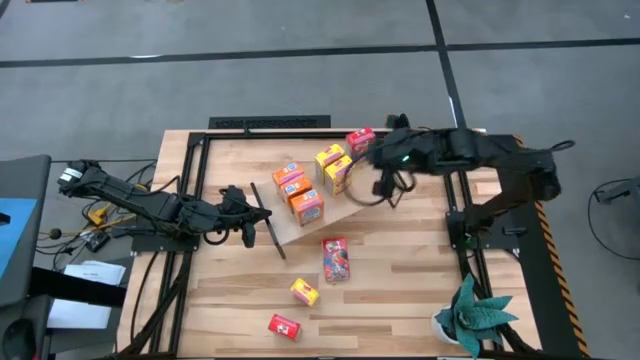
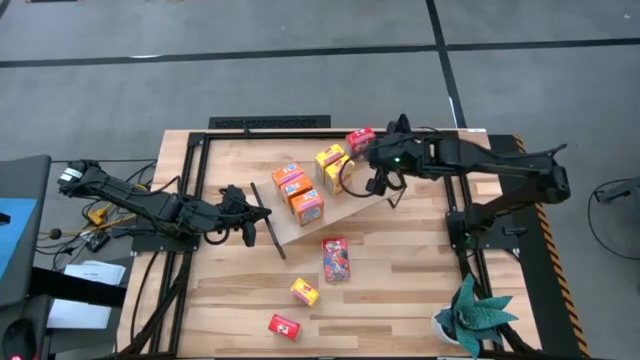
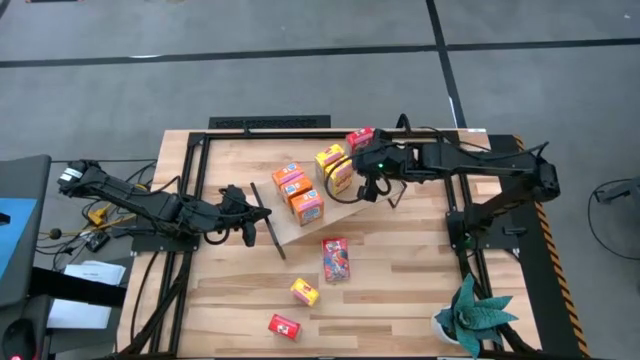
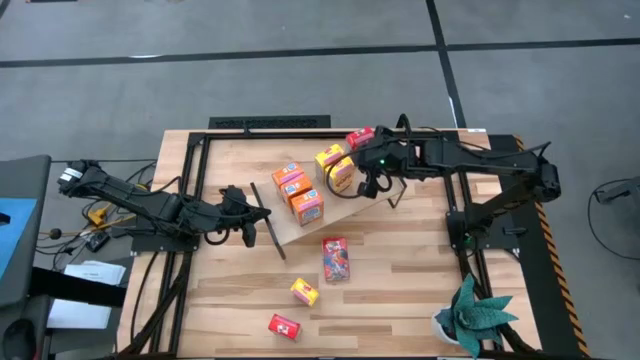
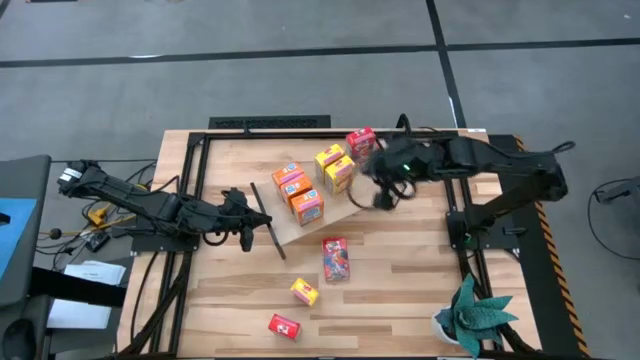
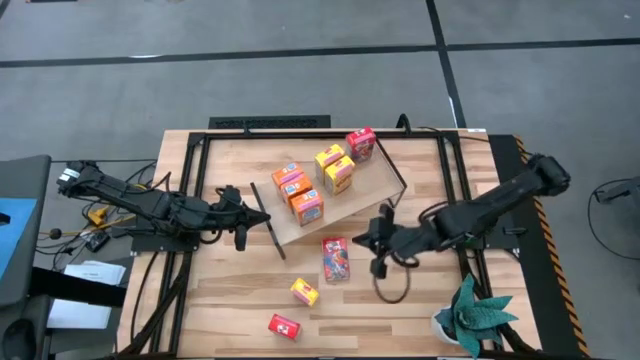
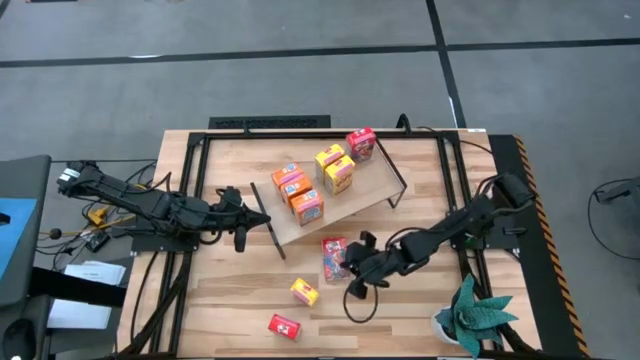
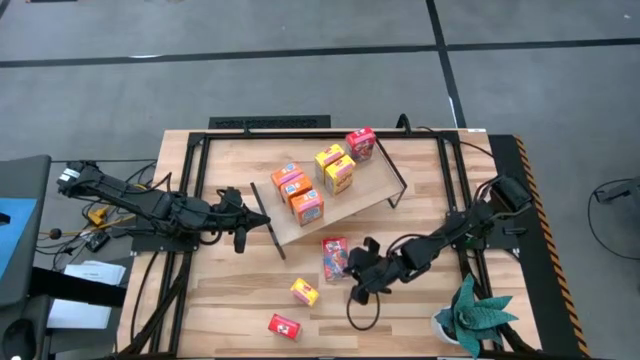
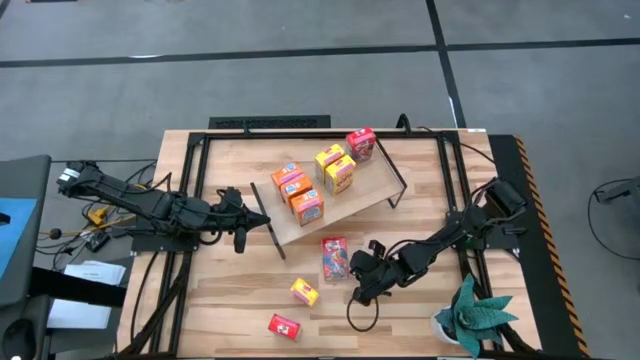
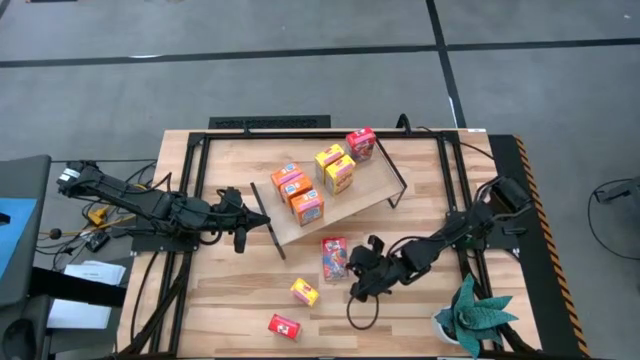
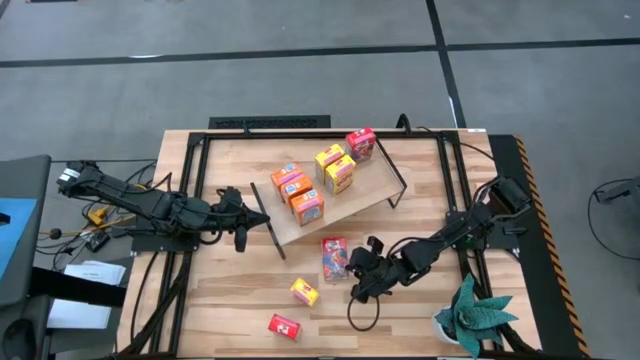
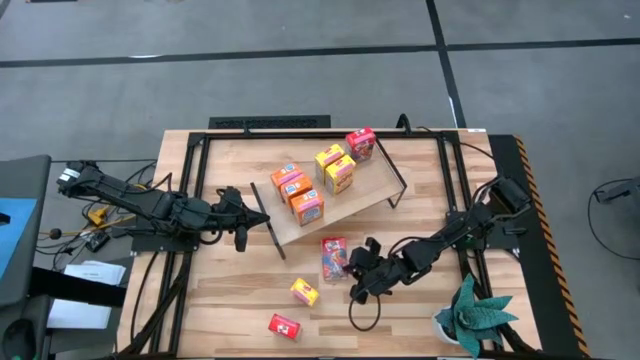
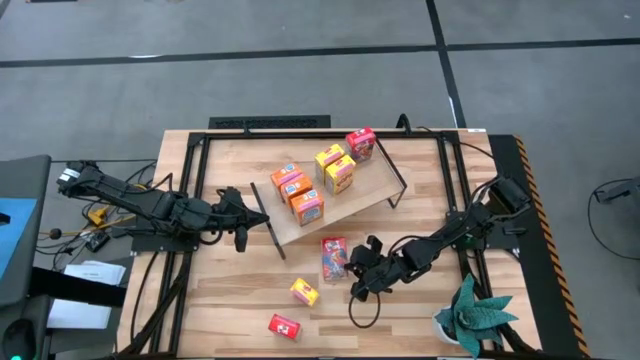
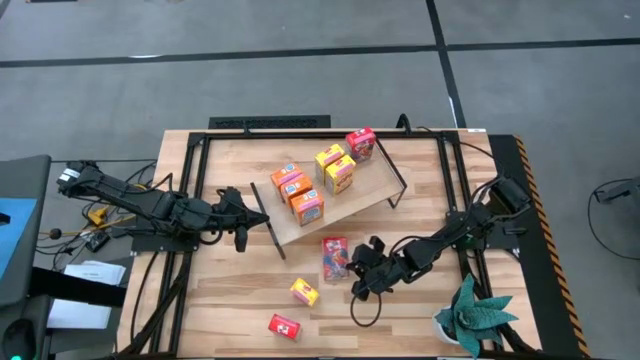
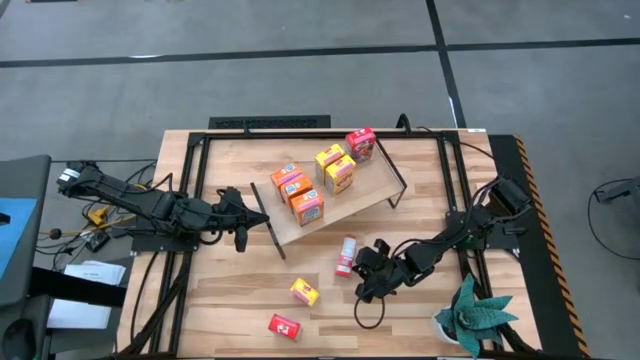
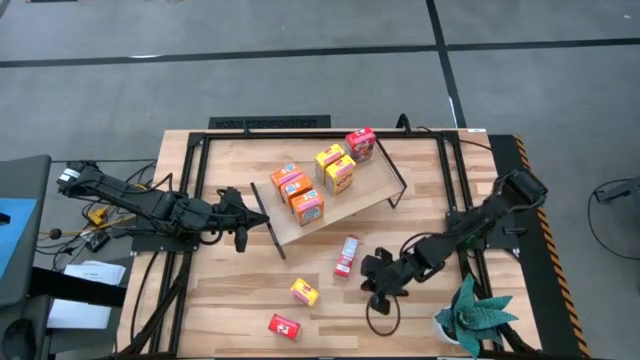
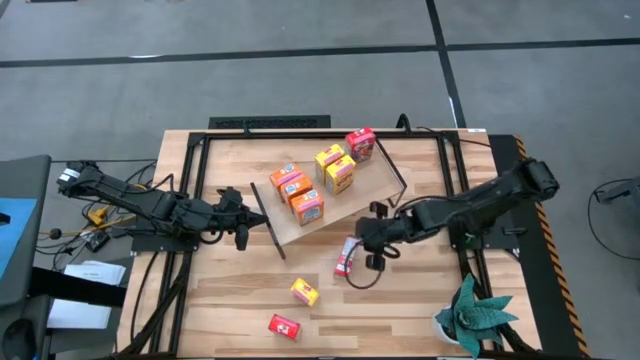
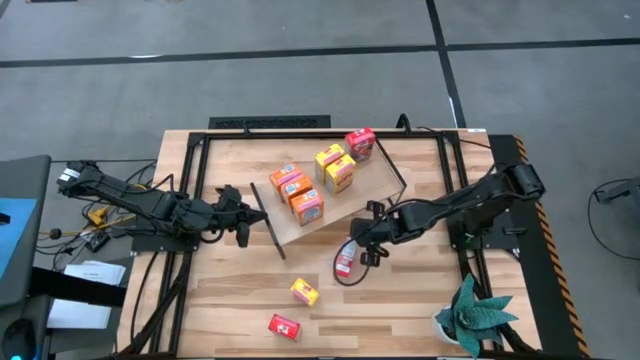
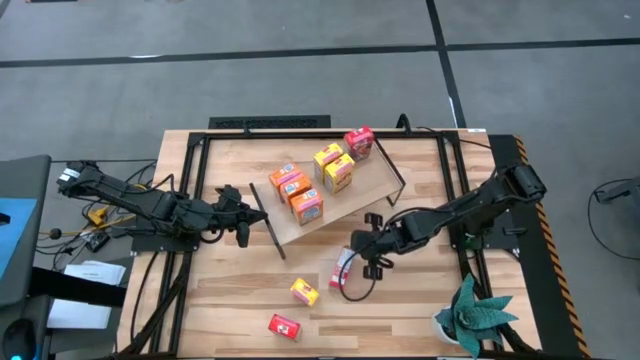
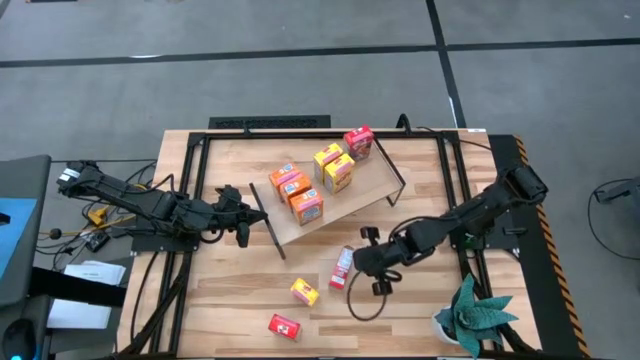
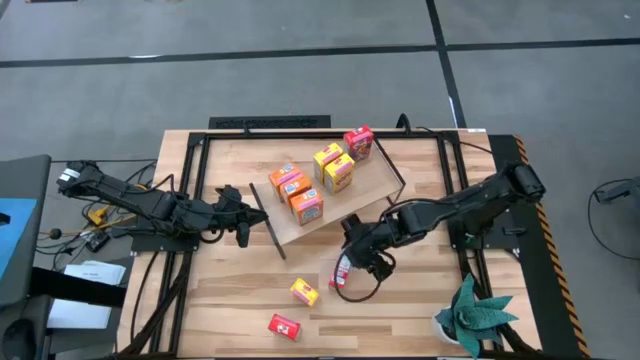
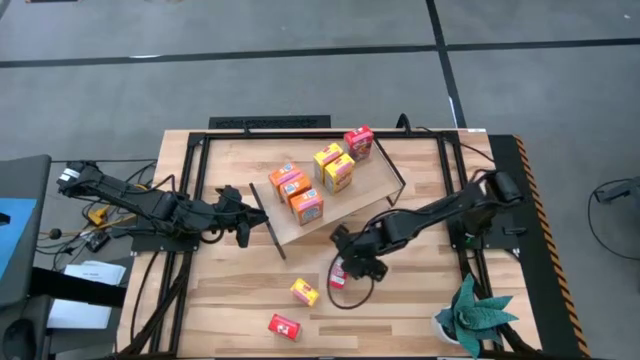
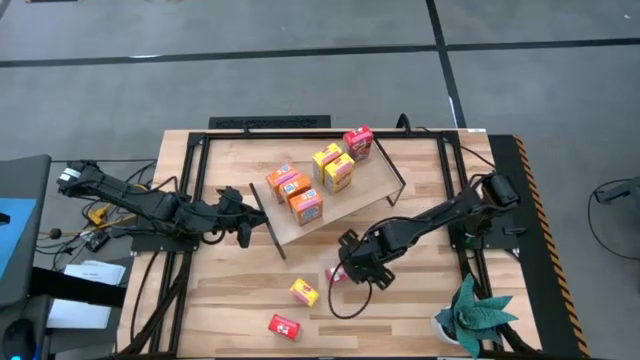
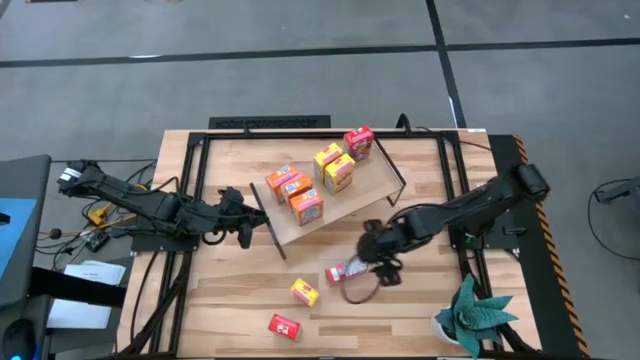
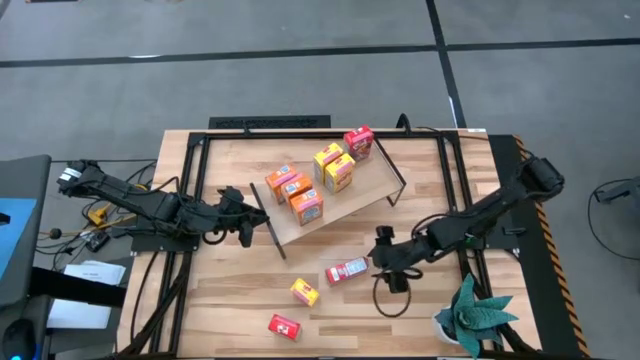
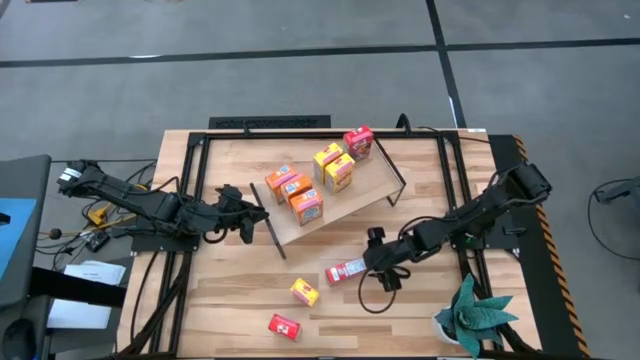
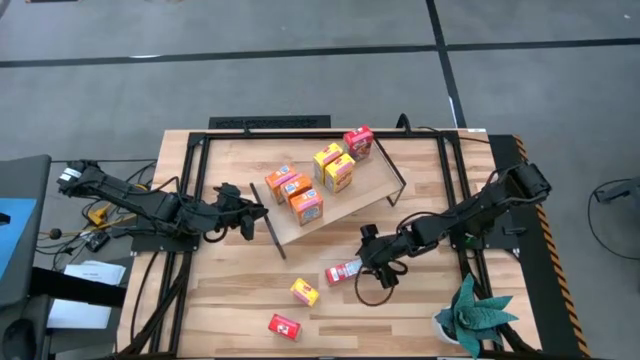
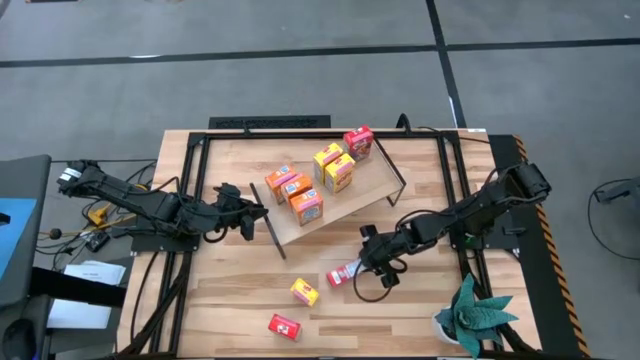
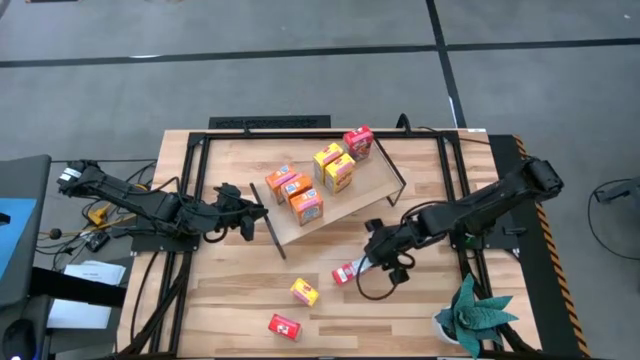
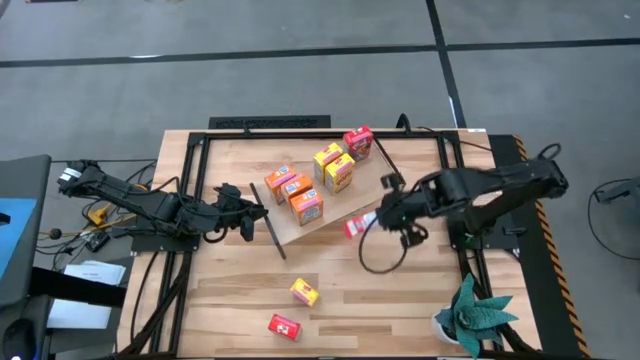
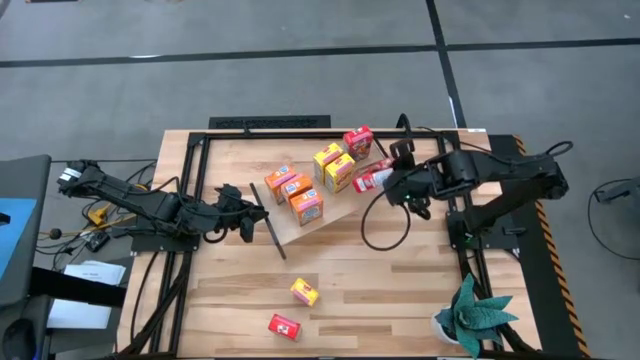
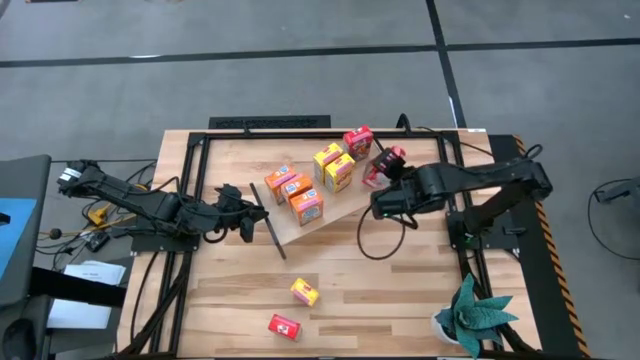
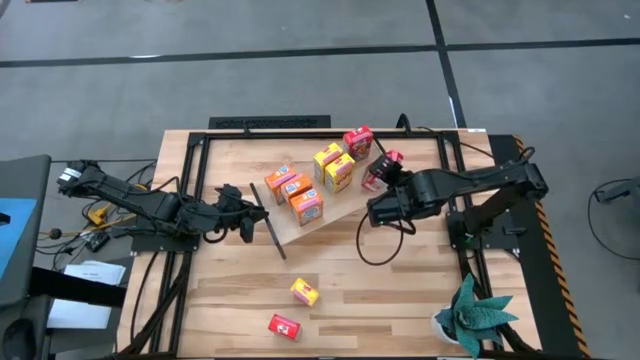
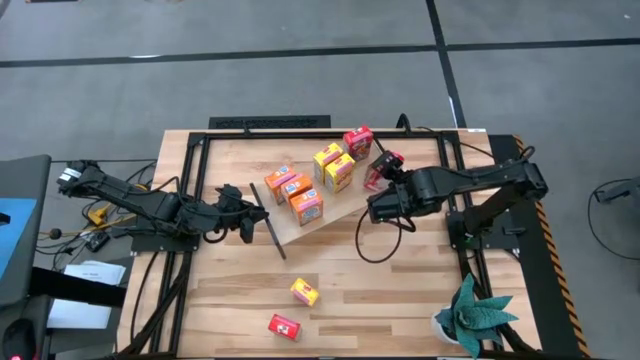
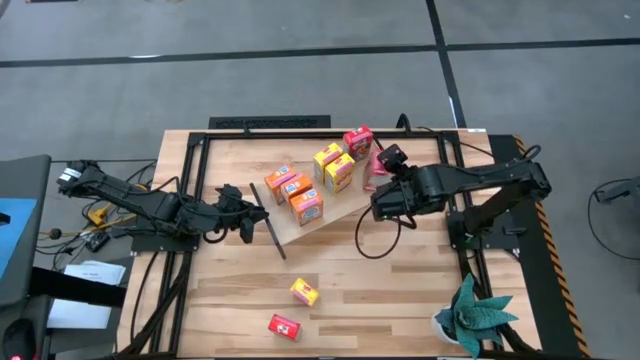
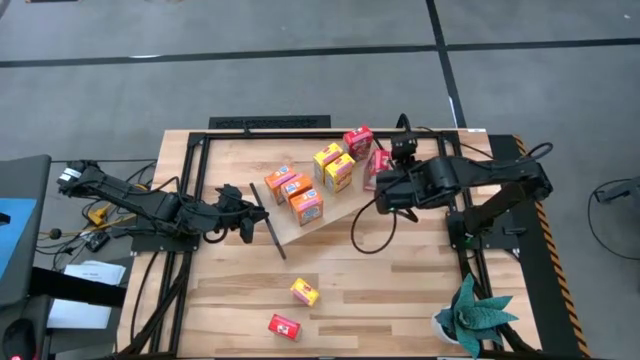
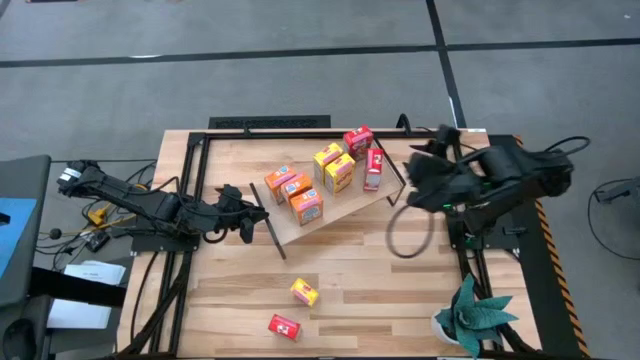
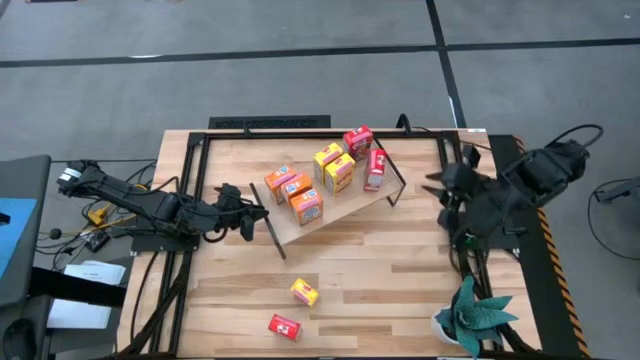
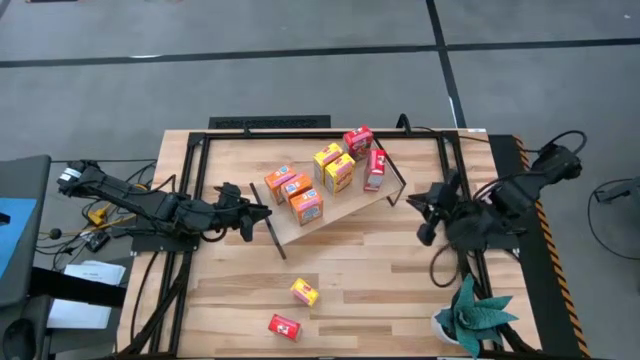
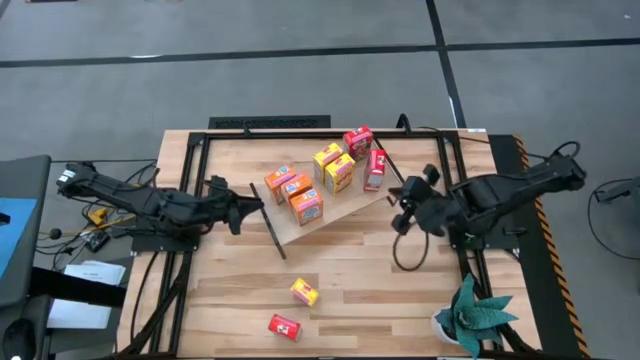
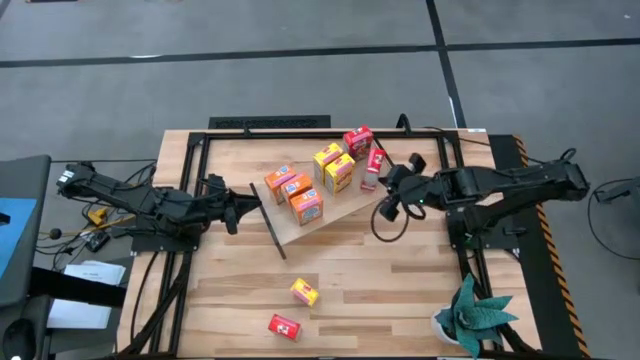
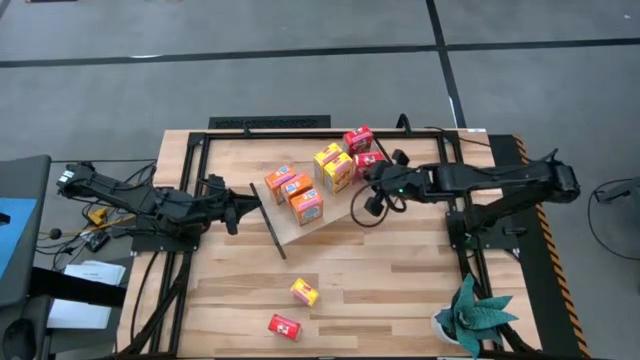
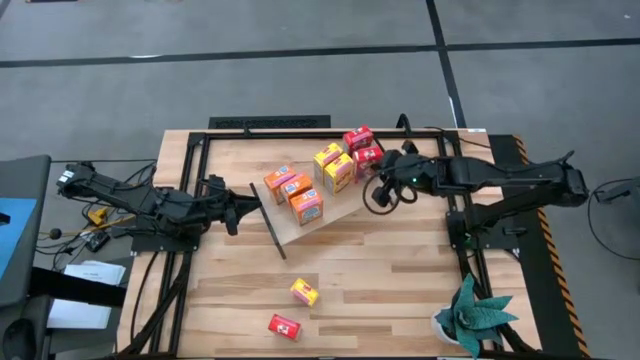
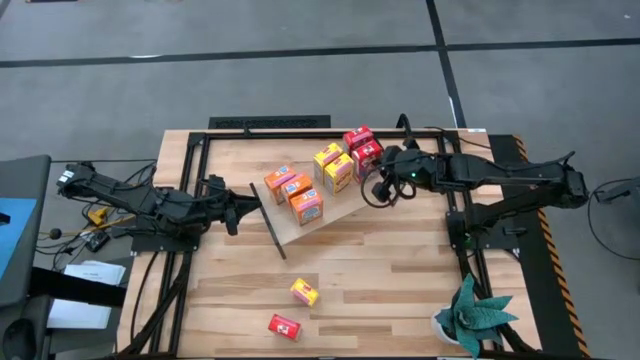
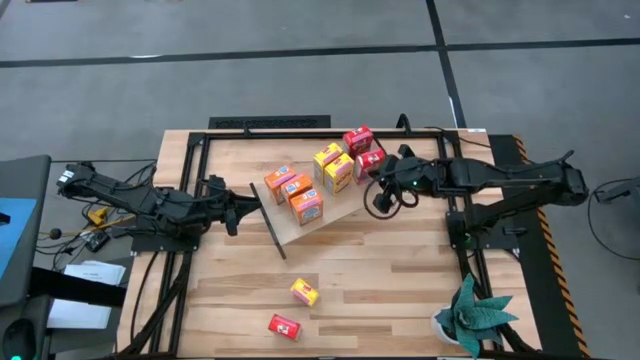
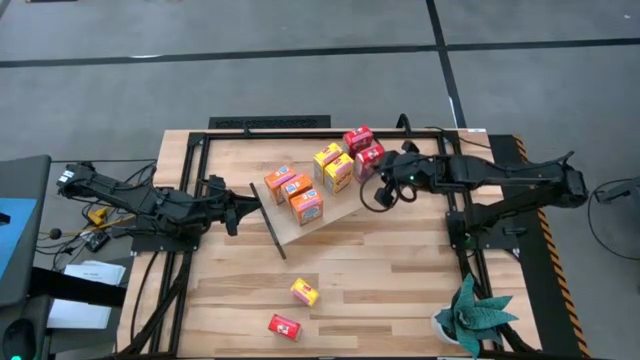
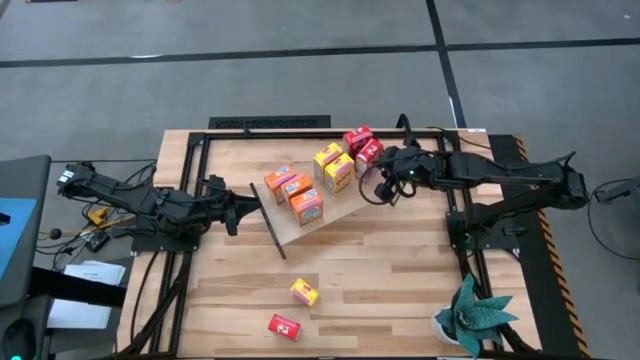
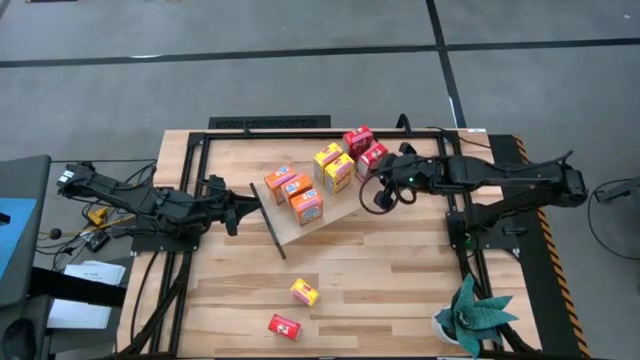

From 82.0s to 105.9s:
Task: Stack cereal on shelf
Put the top red cereal box on the shelf aligned with the other red cereal box
